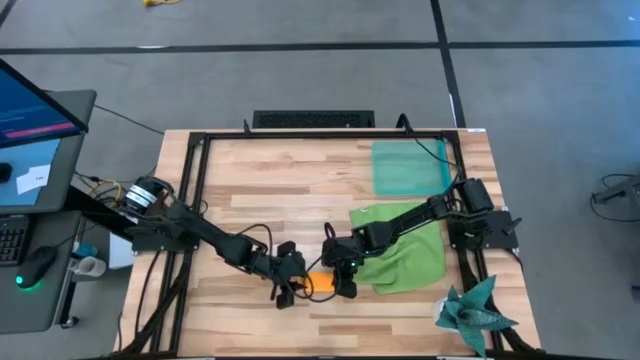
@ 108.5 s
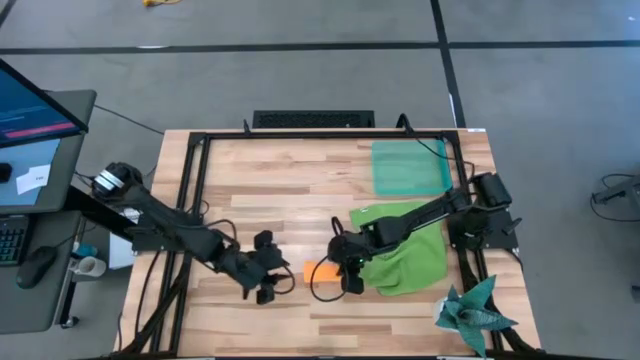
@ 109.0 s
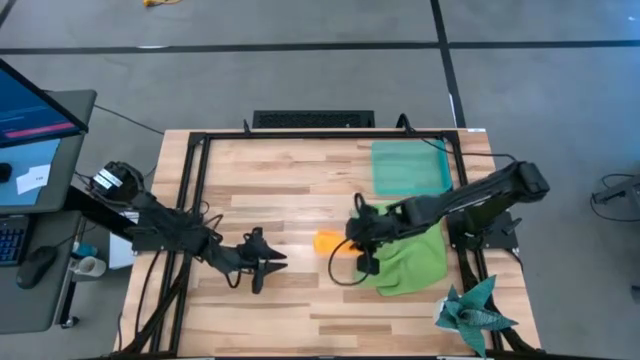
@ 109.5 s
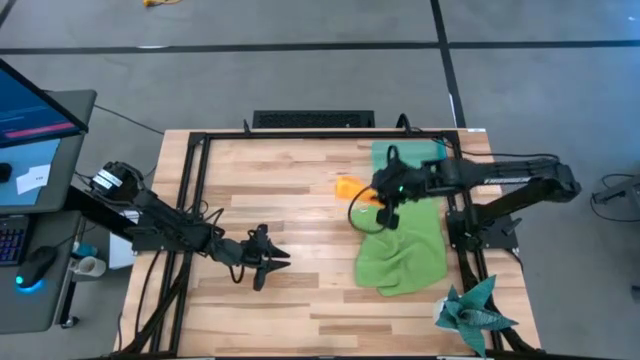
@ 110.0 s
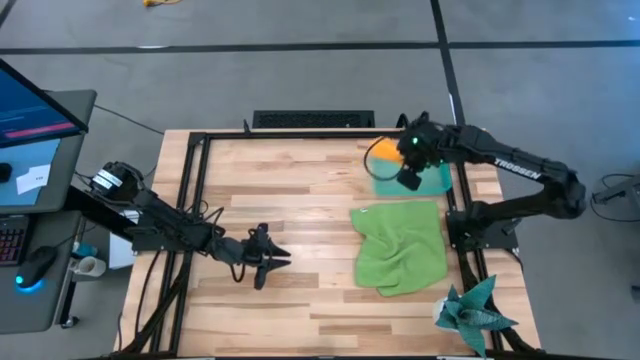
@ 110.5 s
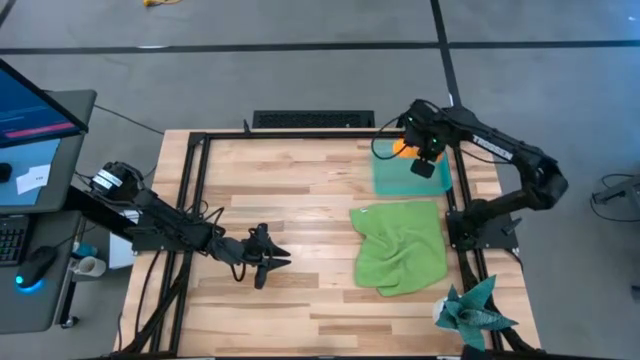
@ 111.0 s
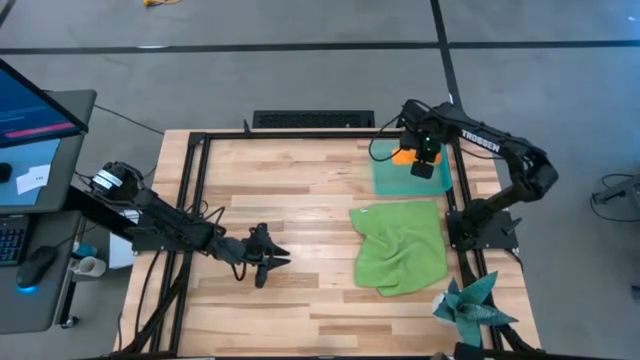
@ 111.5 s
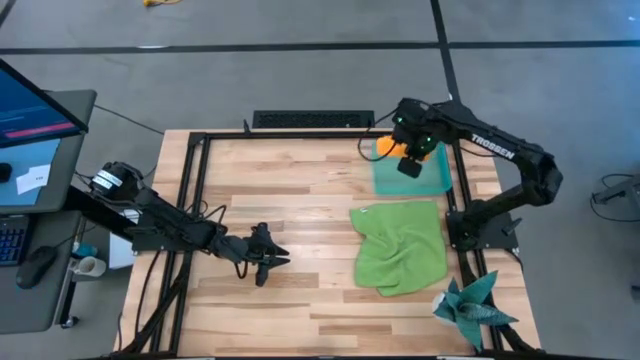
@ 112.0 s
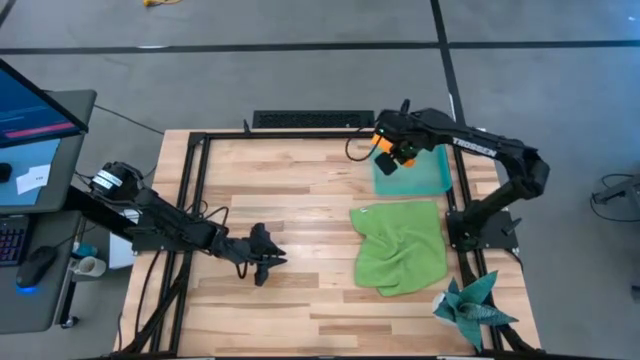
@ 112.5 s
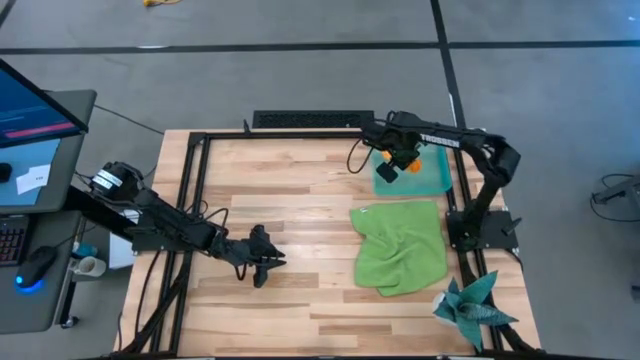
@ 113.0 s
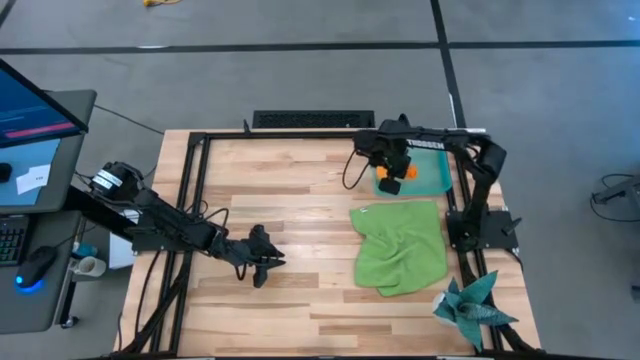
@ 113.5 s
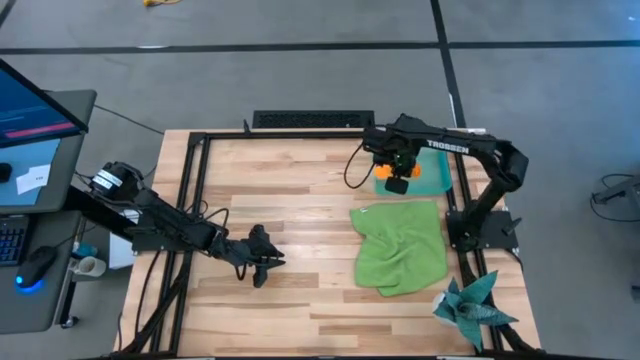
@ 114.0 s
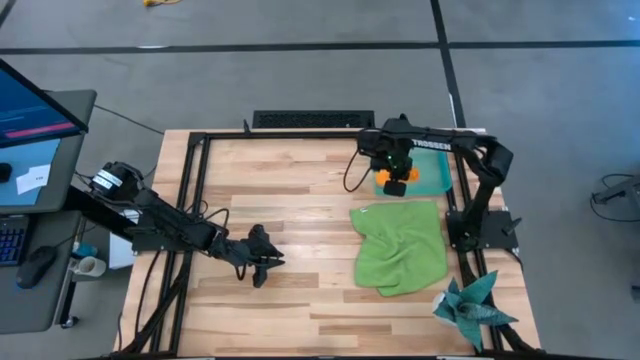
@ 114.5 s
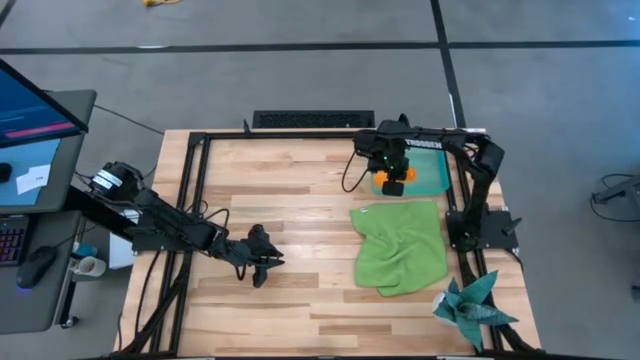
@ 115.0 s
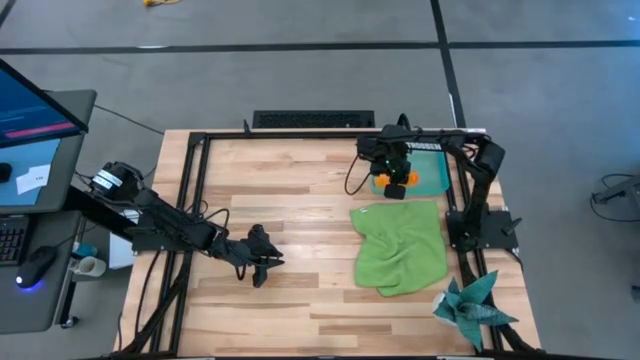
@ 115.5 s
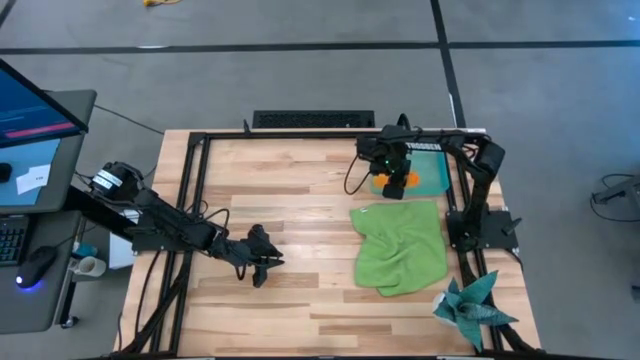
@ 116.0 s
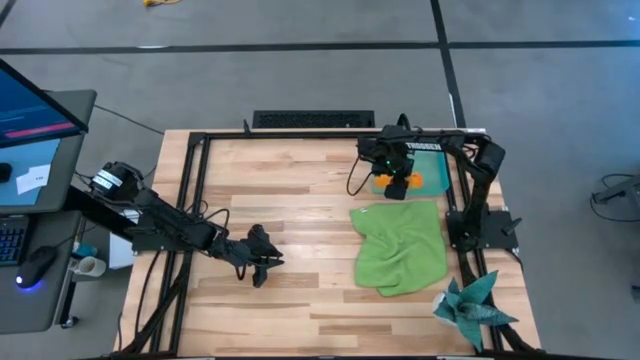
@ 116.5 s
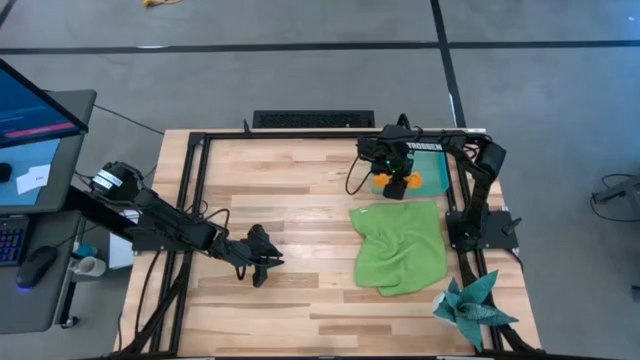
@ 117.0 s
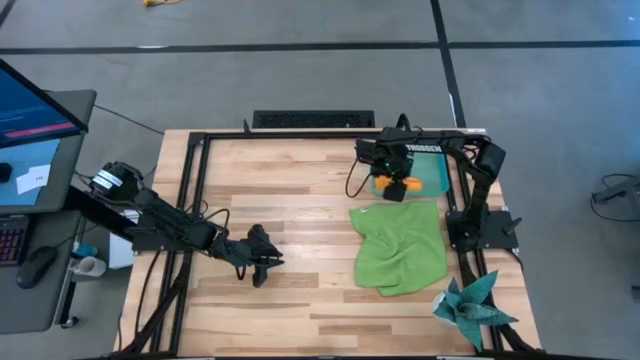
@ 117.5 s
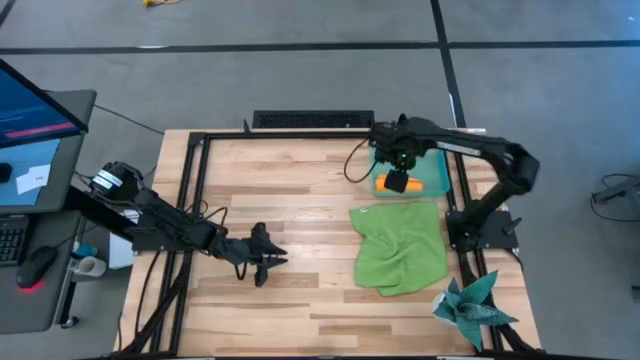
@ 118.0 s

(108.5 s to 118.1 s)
Task: Roll microfiber towels into tight, uniform cylinder then place into a basket
Put the rolled orange towel into the blue bin

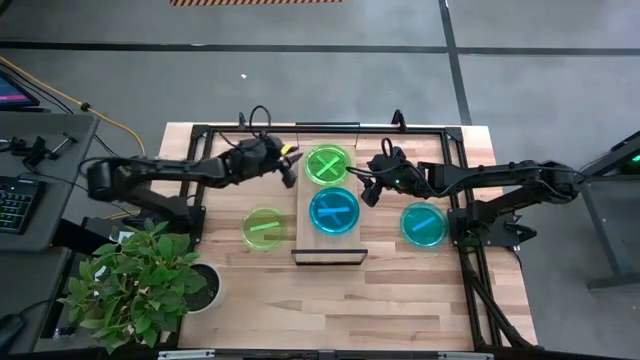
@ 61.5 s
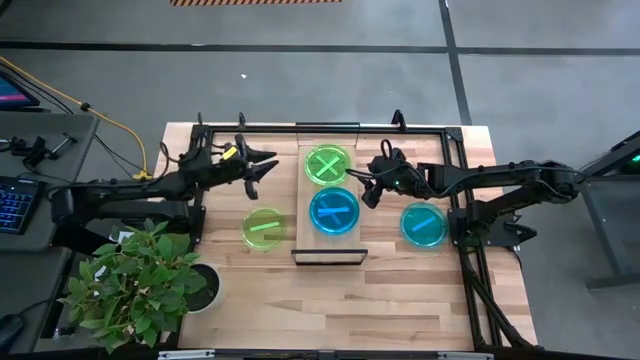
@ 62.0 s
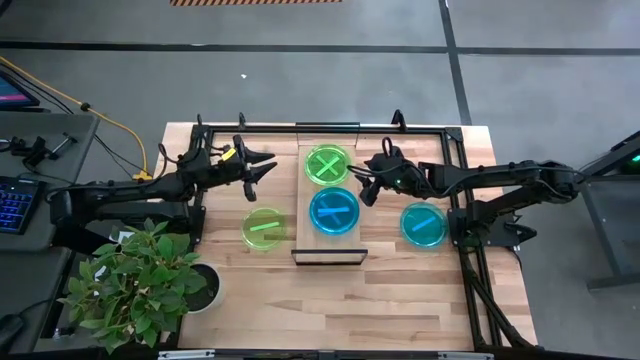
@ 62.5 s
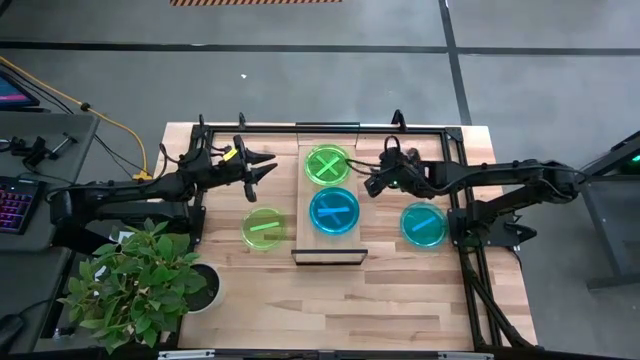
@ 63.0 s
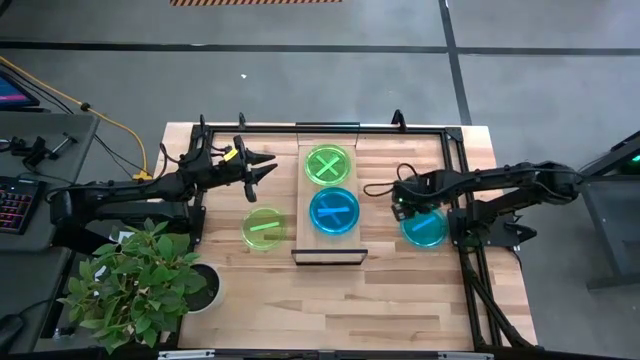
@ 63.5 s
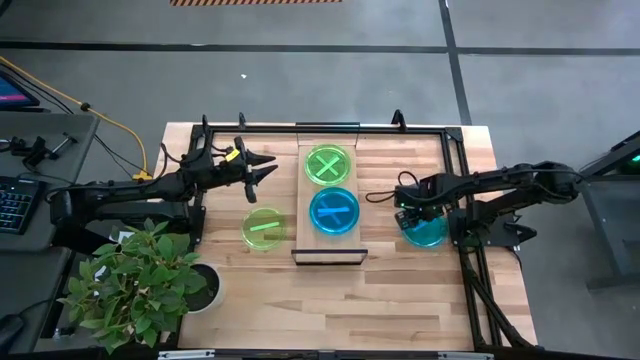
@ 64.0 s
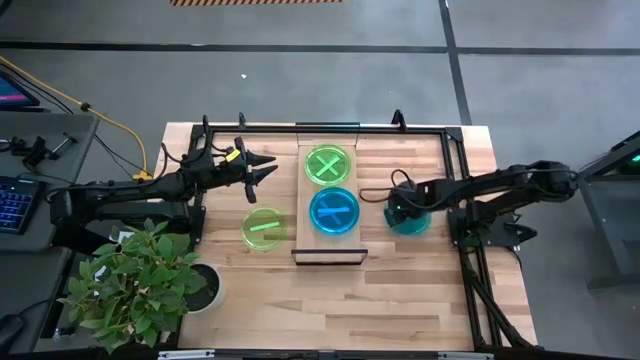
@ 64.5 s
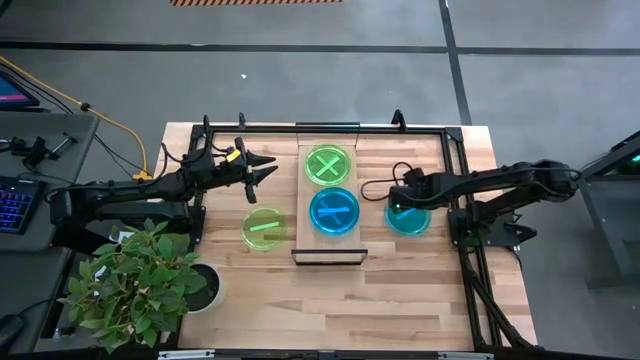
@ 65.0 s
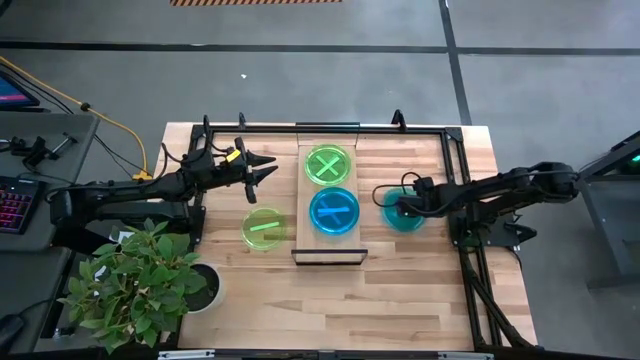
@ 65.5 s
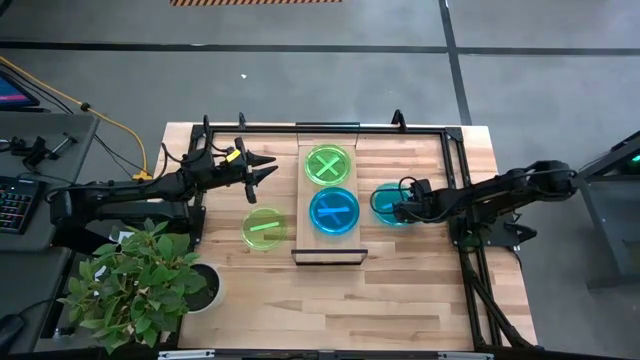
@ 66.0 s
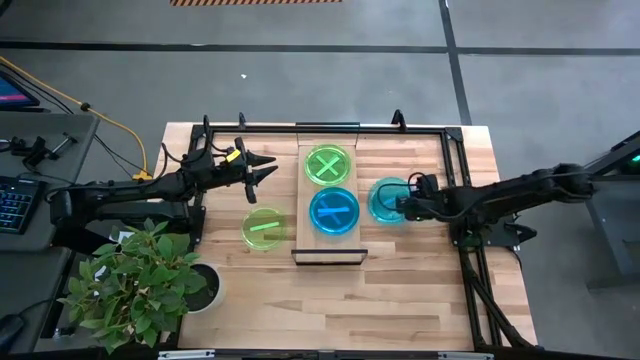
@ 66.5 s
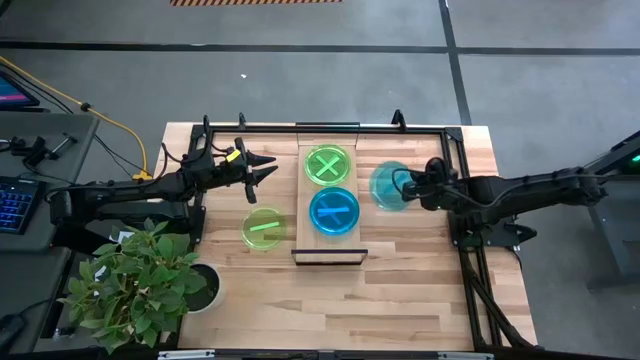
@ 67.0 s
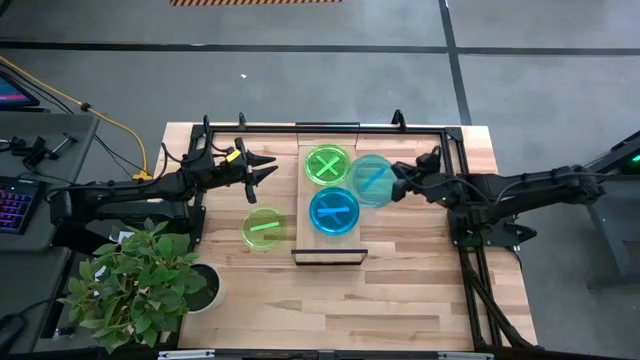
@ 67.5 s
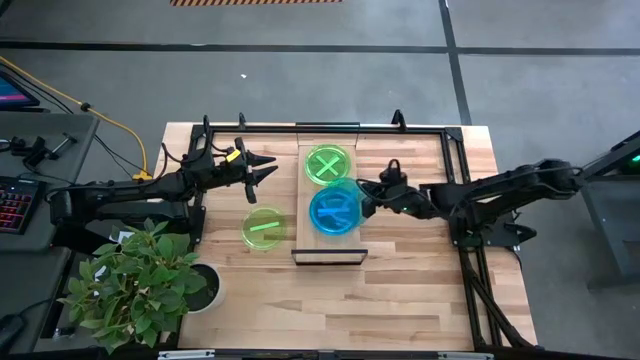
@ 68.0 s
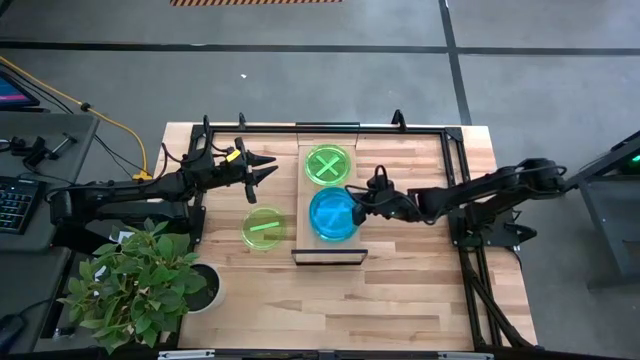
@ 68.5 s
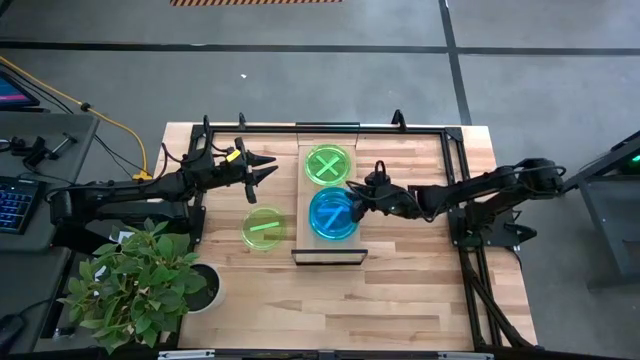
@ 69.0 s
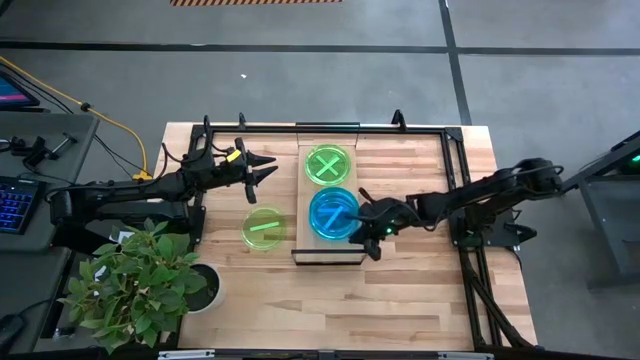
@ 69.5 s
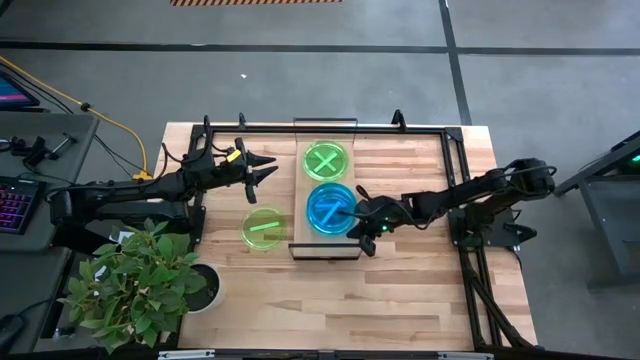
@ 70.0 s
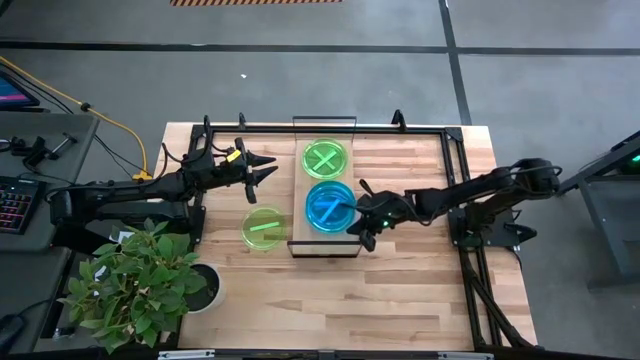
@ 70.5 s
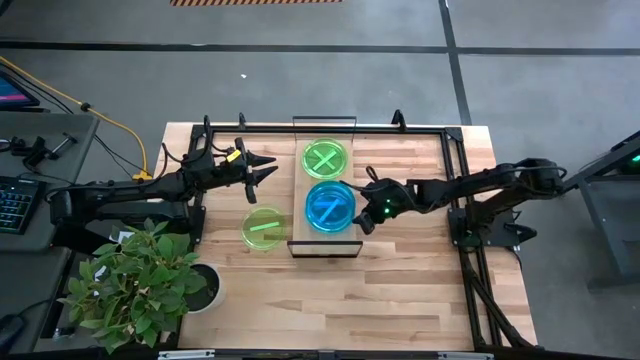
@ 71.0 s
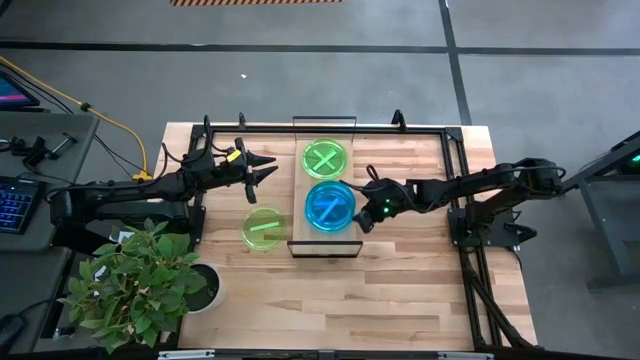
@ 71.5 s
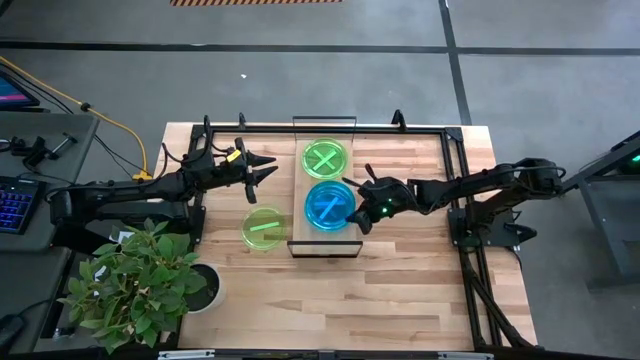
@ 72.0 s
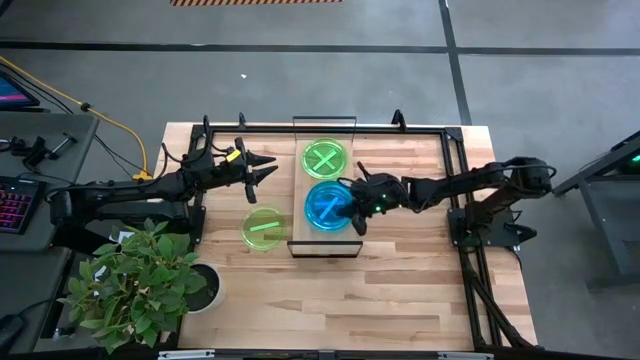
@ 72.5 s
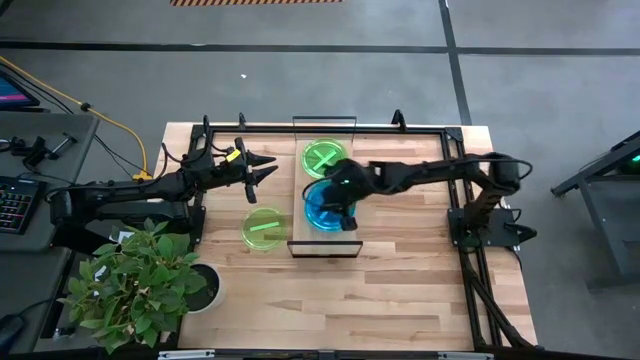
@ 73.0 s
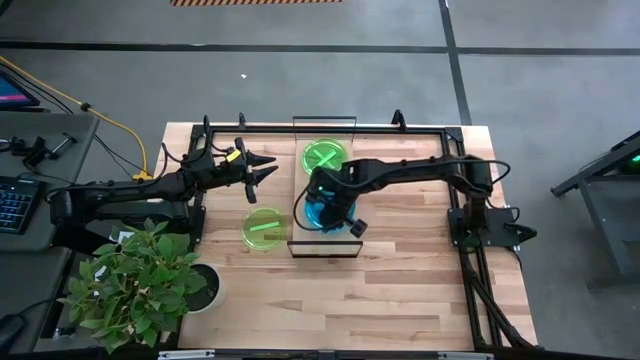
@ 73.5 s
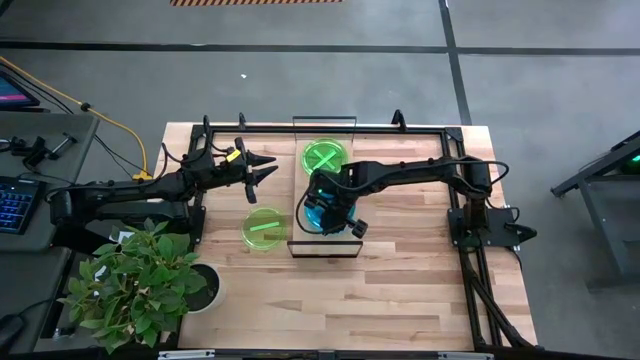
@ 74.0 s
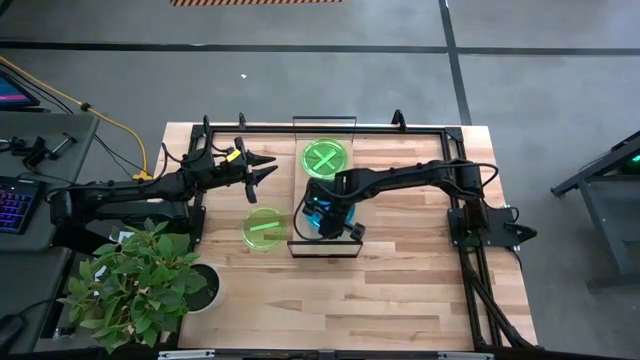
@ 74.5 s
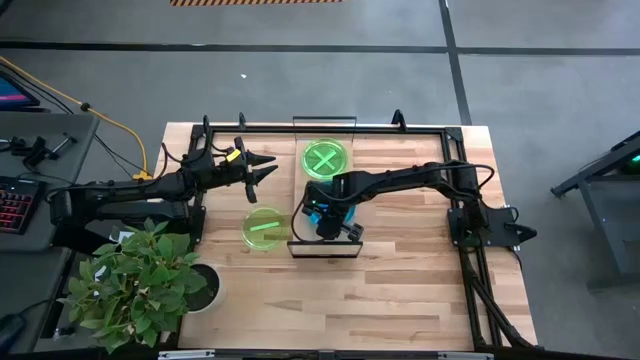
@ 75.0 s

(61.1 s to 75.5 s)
Task: Place and stack plates onto a shelf
Stack the blue plate on top of the blue plates on the shelf
